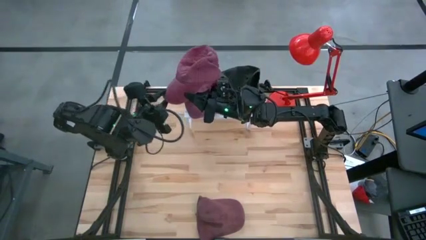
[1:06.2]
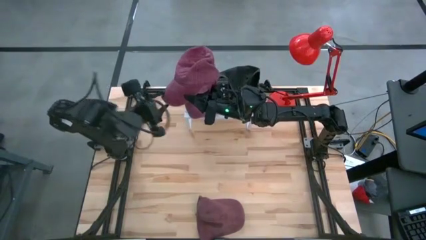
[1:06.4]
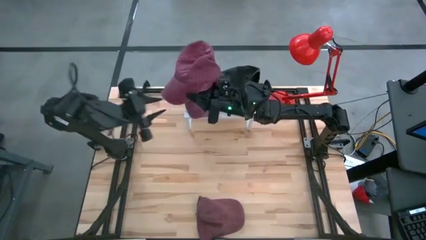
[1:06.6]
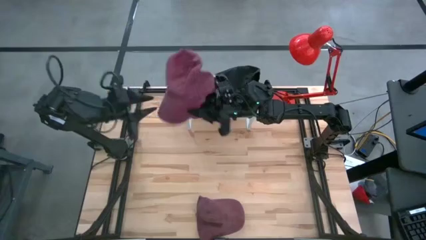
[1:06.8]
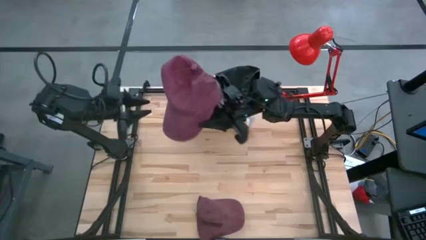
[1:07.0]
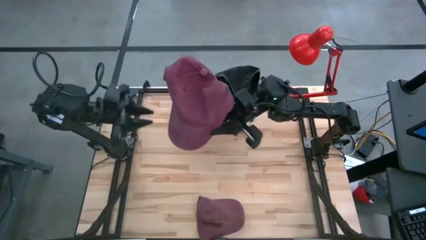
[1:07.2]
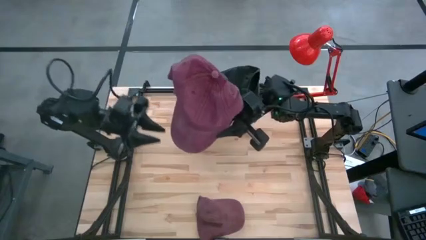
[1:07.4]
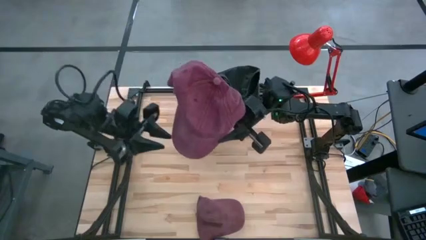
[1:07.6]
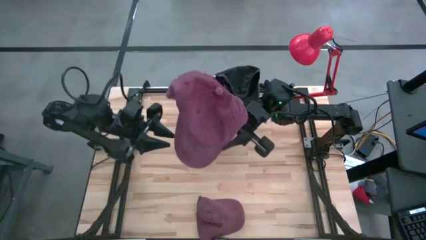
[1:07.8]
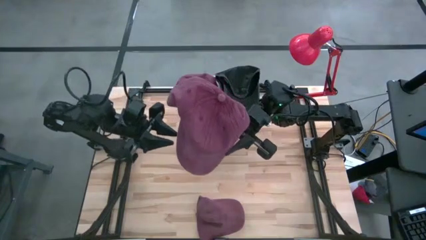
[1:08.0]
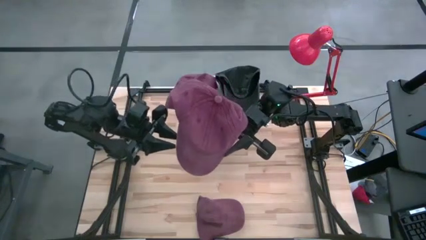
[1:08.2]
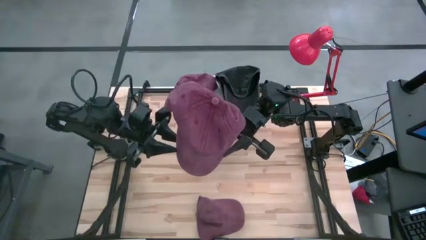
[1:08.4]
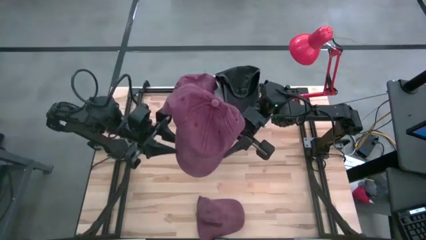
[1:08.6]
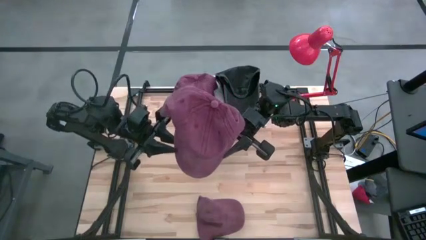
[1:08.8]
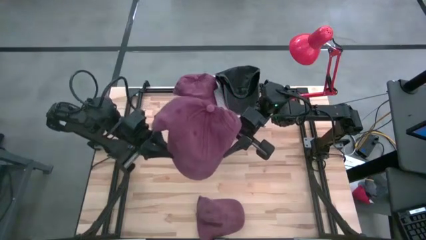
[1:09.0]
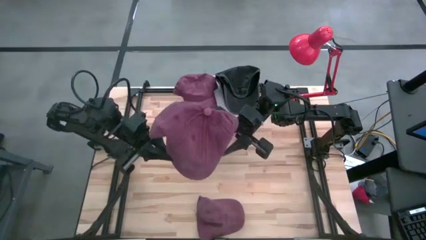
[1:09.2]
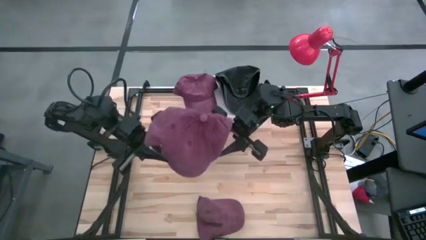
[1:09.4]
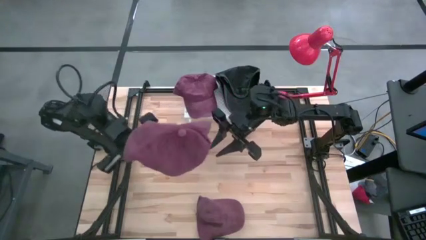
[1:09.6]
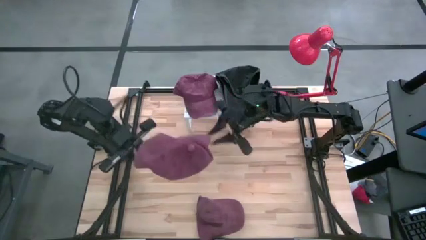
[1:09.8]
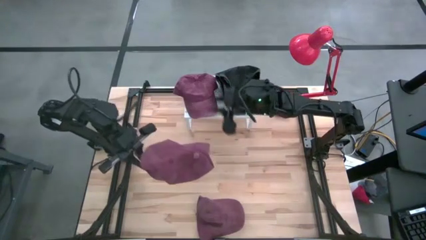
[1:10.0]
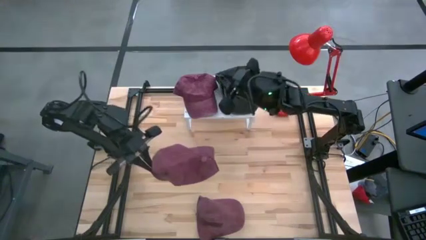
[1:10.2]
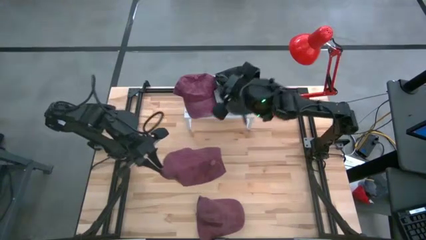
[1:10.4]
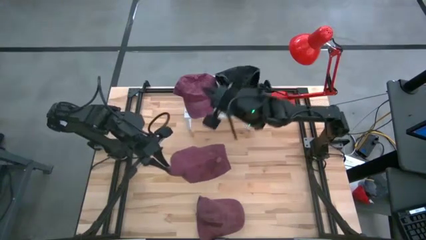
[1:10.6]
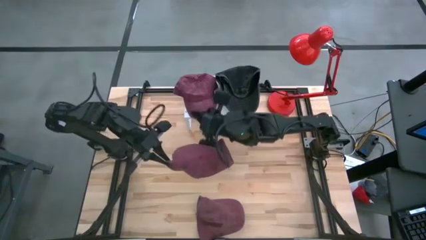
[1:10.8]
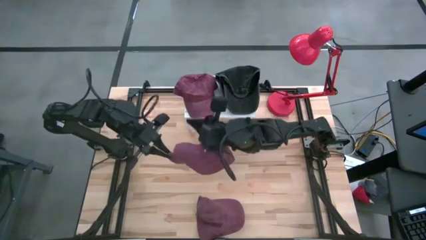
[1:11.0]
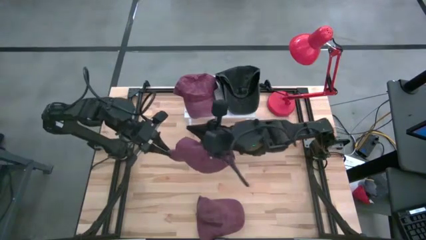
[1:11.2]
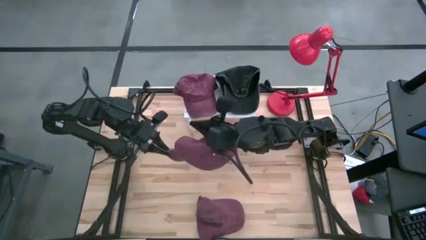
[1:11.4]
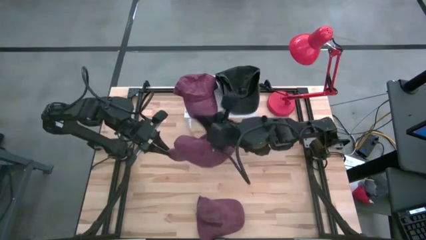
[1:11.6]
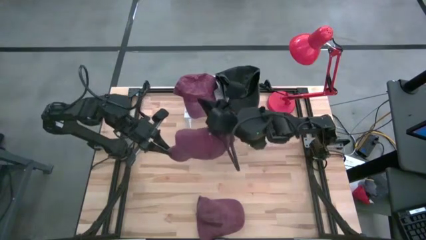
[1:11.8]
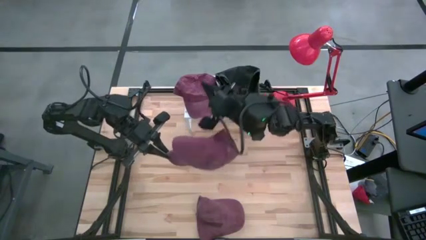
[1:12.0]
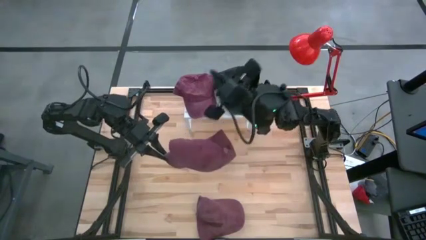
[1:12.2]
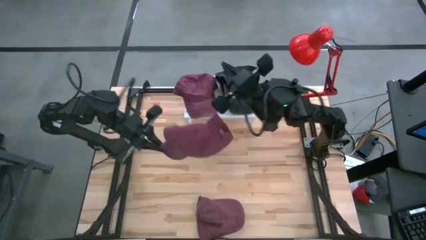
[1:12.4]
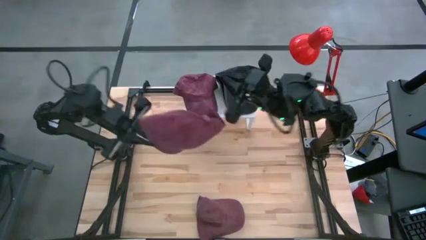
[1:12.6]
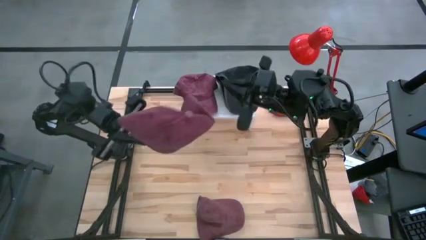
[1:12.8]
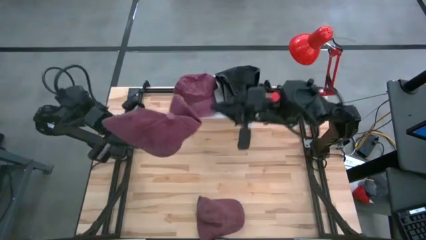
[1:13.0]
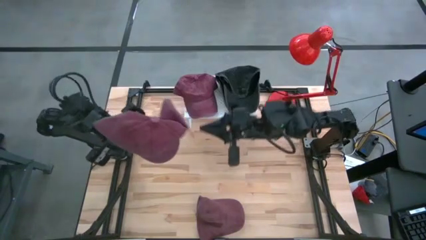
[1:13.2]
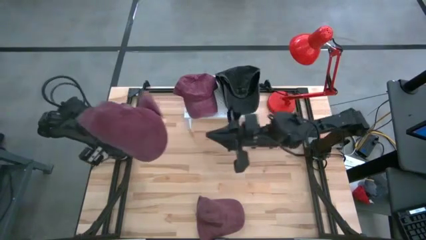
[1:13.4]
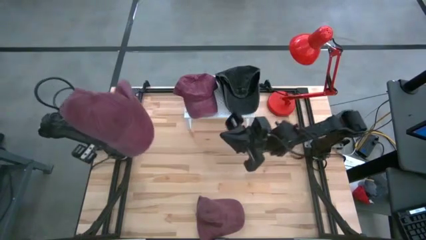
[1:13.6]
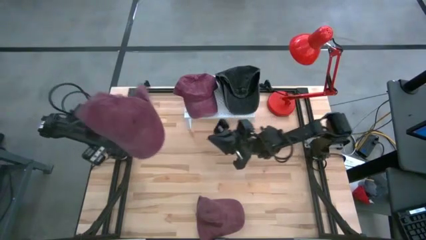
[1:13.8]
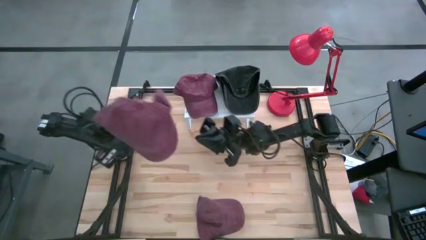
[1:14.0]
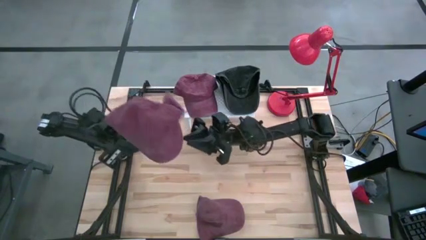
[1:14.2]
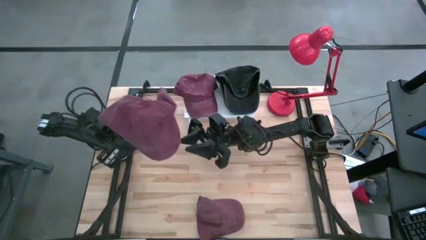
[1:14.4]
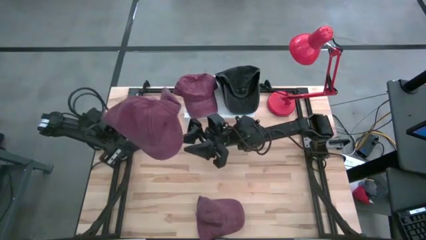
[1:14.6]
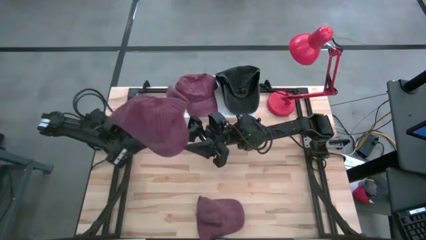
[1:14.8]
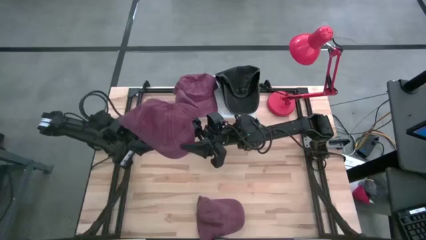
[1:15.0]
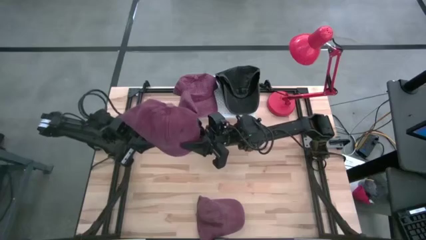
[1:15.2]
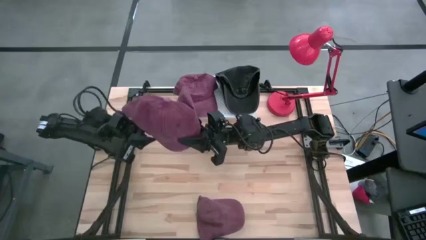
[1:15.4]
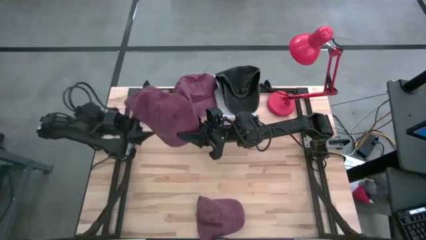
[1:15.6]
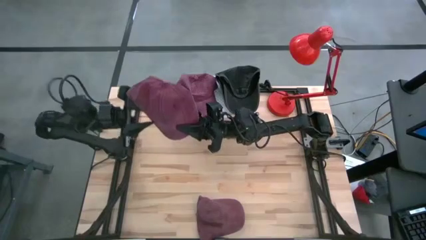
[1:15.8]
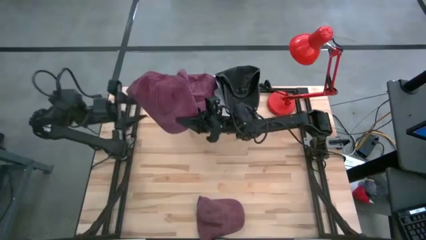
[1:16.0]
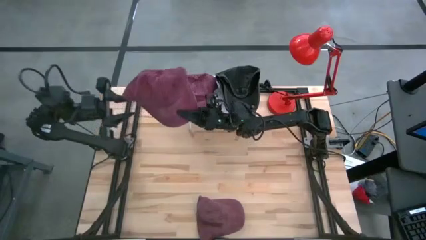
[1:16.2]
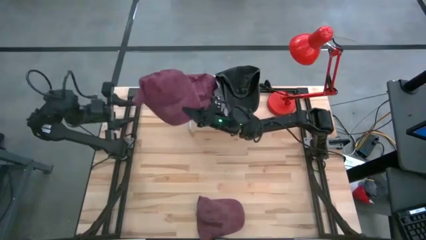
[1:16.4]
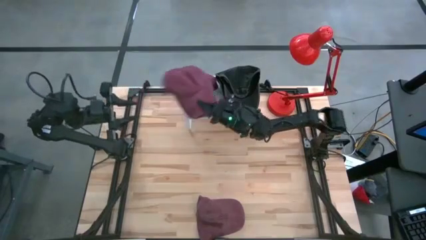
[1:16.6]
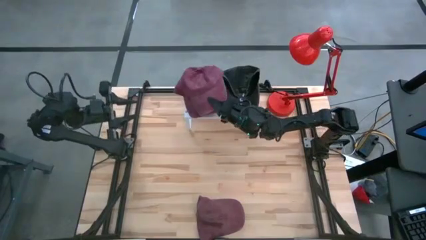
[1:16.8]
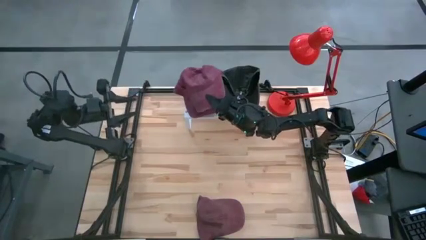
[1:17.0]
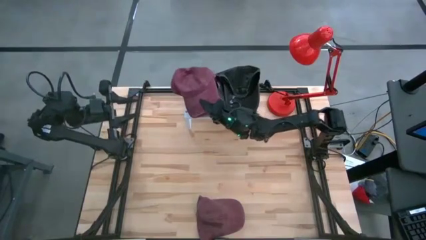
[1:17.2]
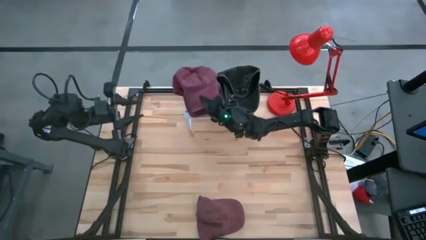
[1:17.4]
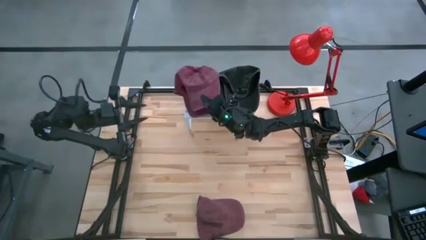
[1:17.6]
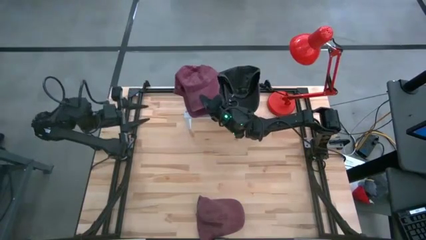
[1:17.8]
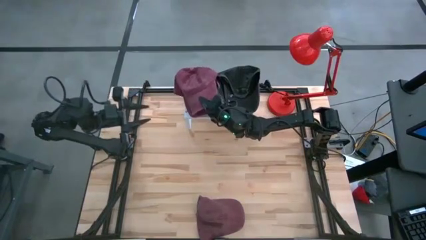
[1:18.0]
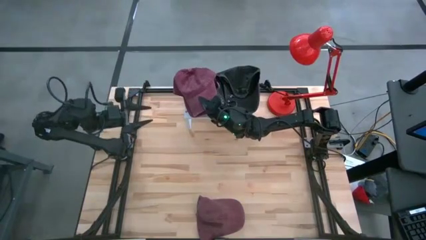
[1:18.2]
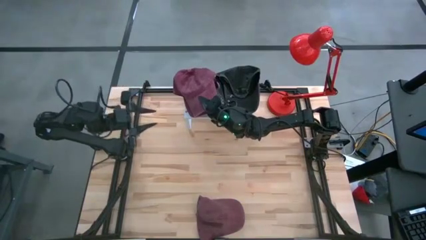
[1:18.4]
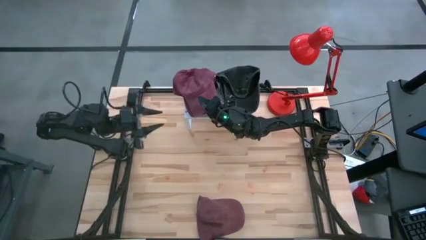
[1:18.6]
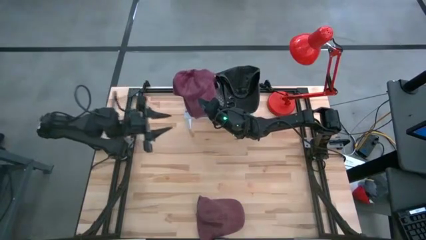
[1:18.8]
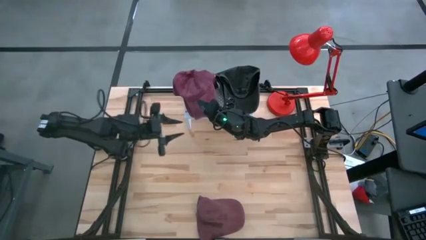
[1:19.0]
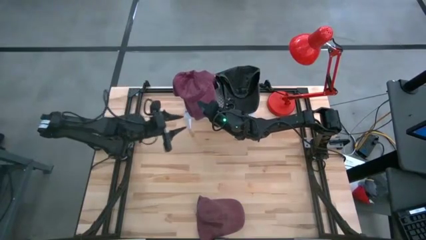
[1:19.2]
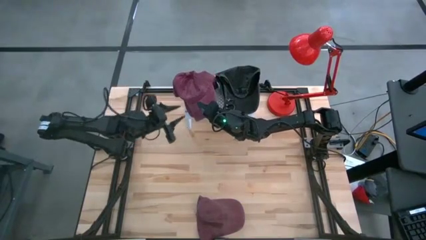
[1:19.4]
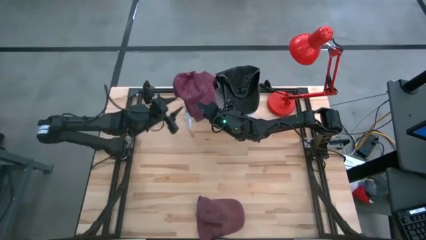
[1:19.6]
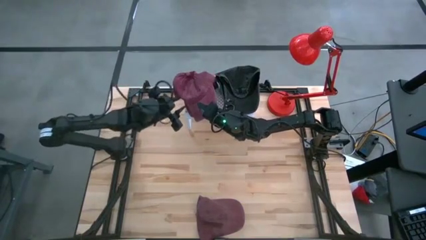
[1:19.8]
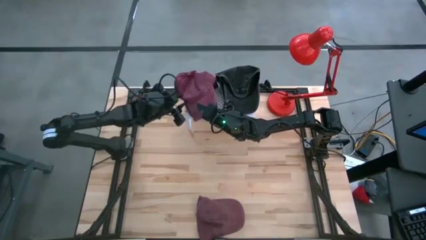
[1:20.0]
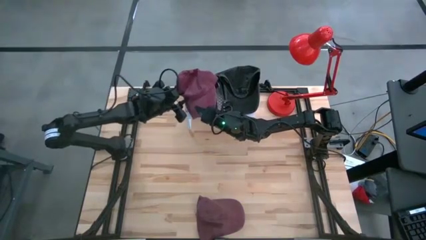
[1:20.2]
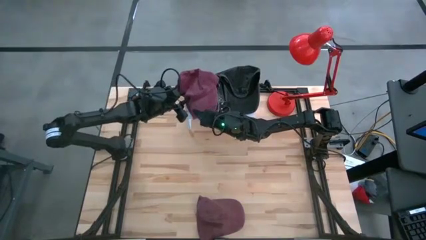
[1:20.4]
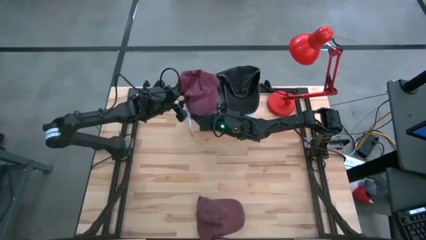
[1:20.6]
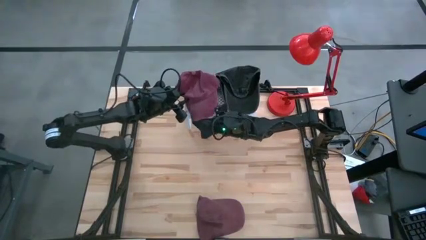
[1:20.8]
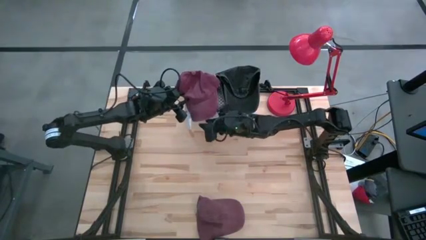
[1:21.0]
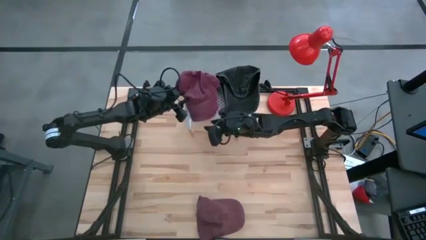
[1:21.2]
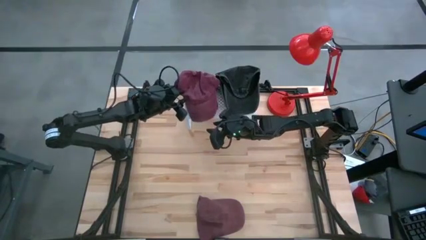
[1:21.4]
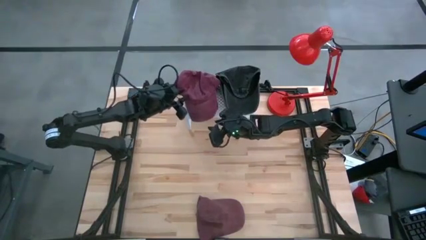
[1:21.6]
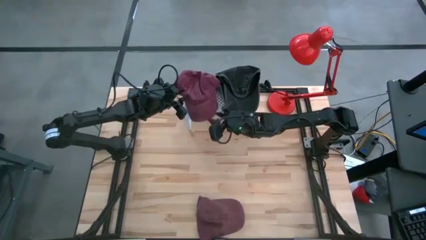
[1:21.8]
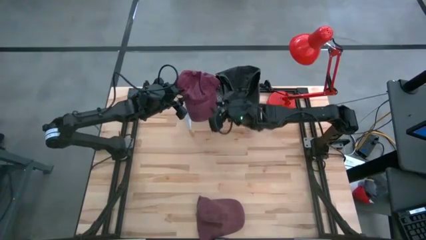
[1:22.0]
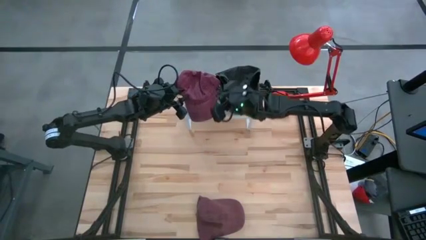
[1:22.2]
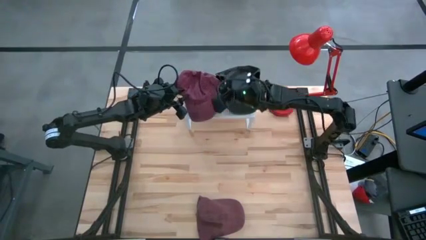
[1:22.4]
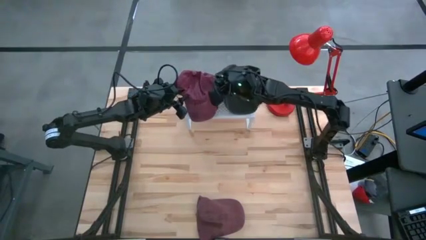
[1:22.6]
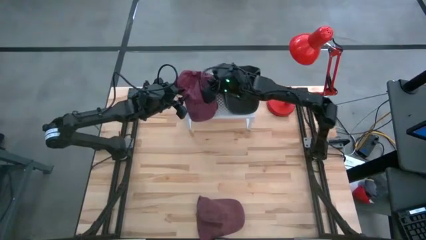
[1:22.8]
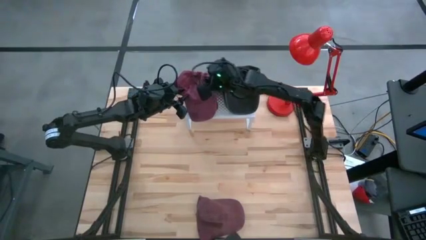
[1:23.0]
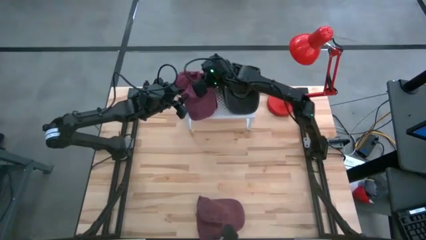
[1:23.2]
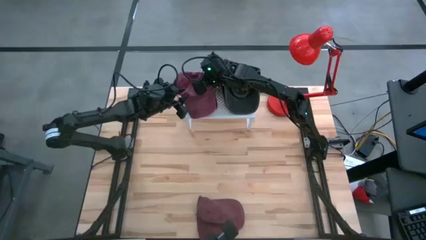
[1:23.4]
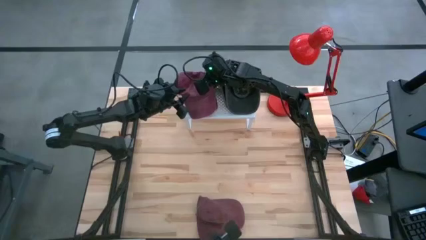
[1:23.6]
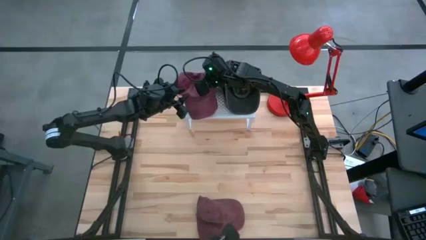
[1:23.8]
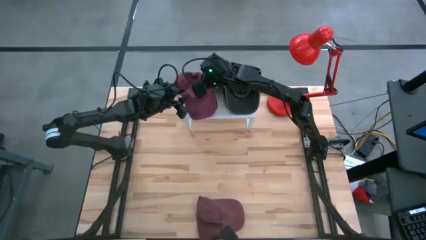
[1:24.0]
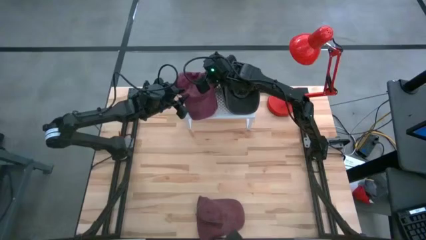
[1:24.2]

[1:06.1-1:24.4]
Task: Pick & Place hat
Stack the top red cap on the red cap on the shelf
